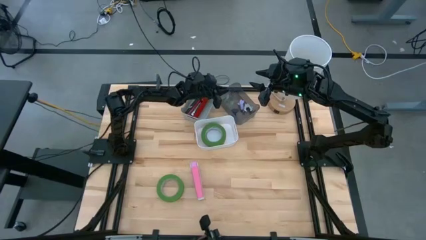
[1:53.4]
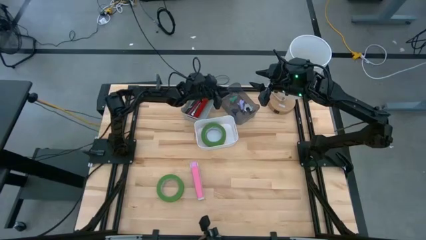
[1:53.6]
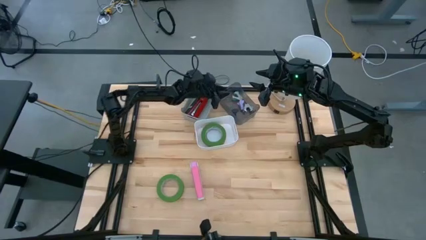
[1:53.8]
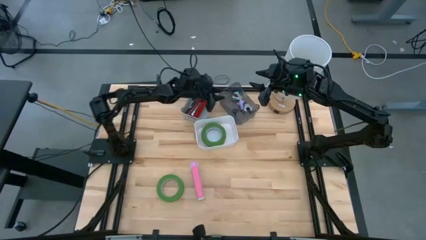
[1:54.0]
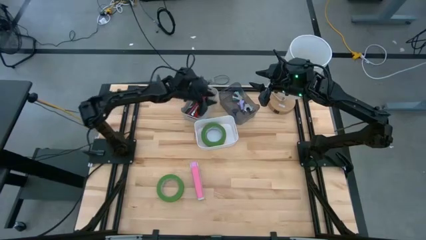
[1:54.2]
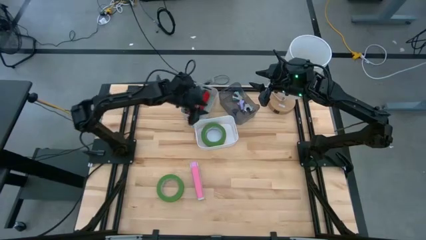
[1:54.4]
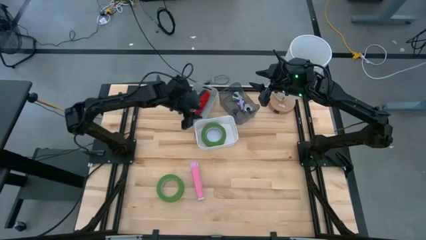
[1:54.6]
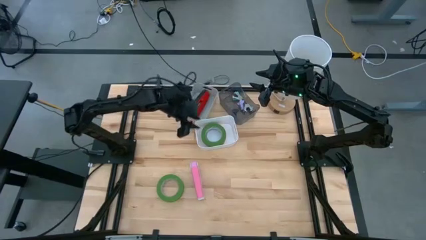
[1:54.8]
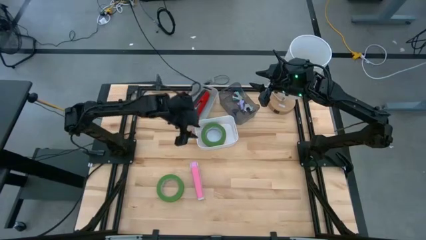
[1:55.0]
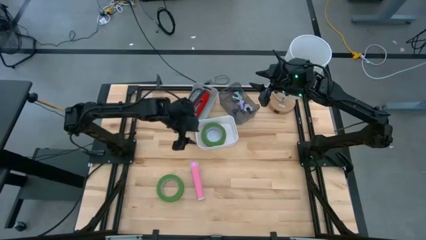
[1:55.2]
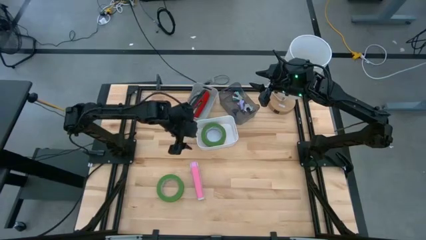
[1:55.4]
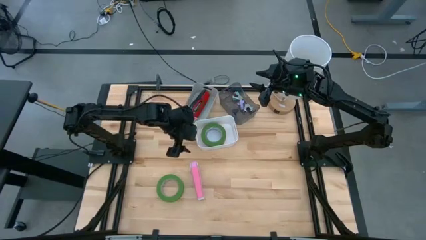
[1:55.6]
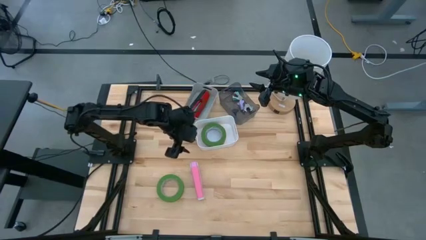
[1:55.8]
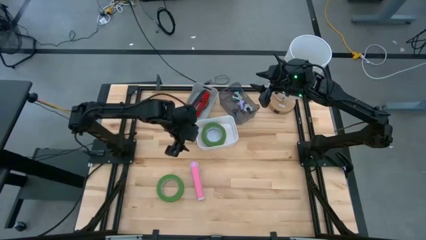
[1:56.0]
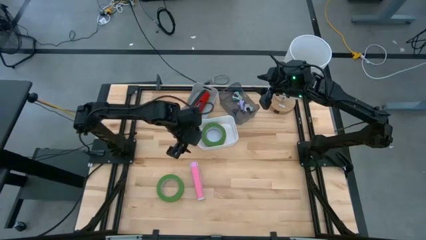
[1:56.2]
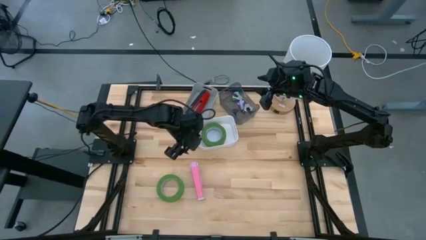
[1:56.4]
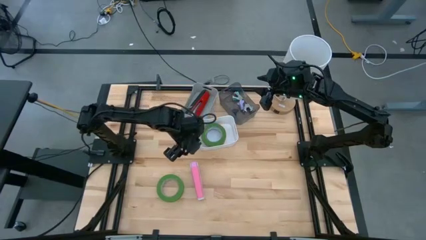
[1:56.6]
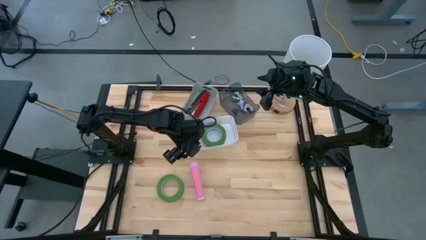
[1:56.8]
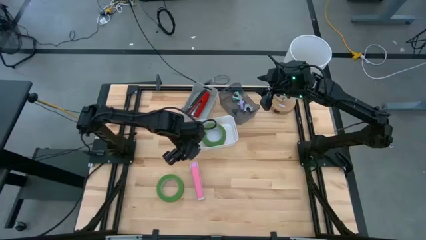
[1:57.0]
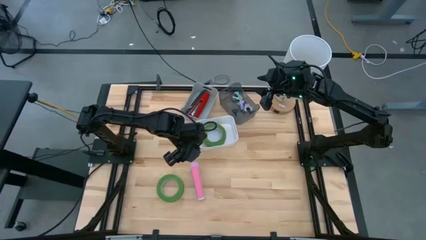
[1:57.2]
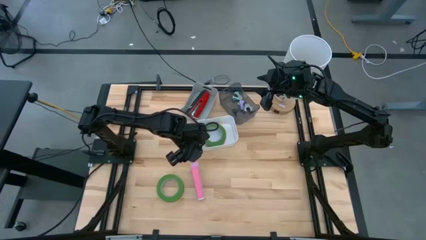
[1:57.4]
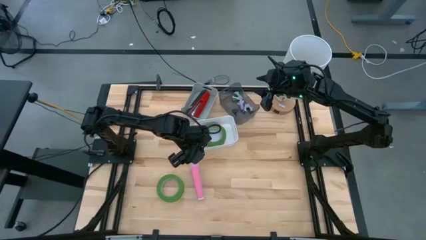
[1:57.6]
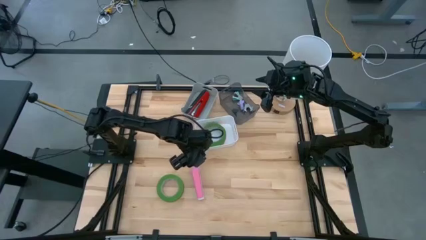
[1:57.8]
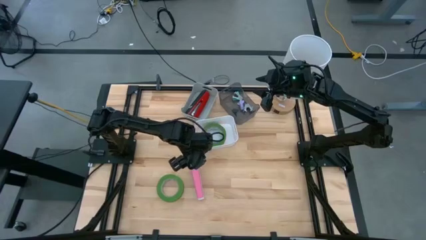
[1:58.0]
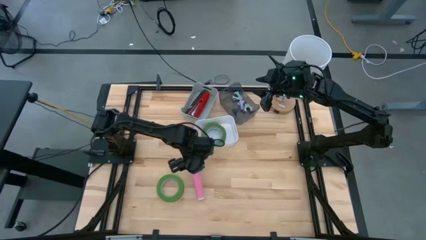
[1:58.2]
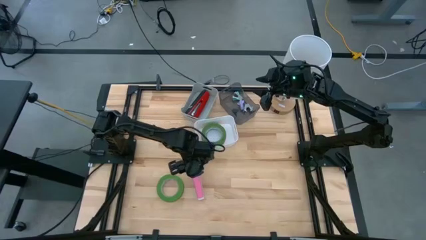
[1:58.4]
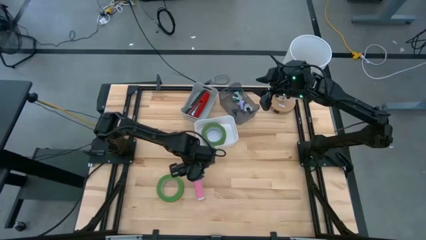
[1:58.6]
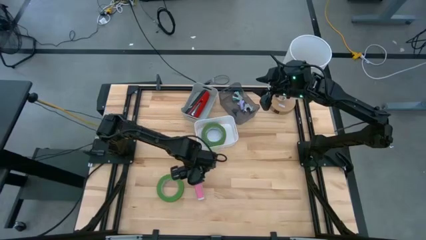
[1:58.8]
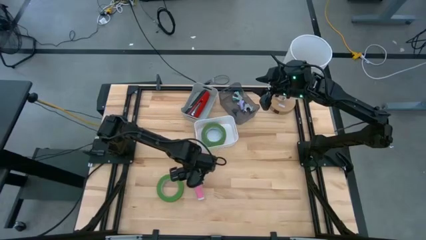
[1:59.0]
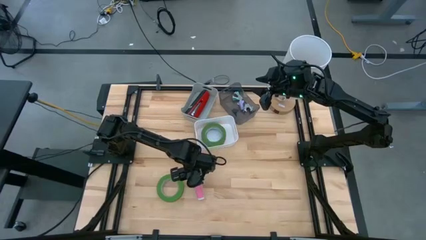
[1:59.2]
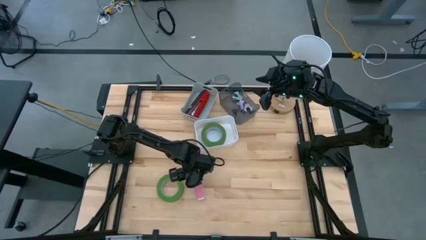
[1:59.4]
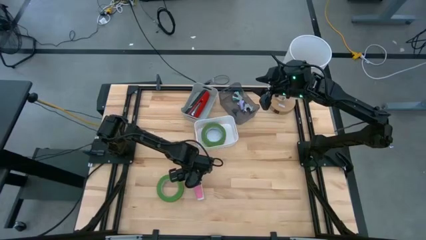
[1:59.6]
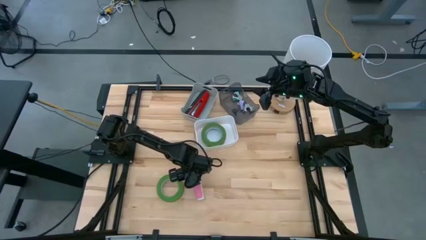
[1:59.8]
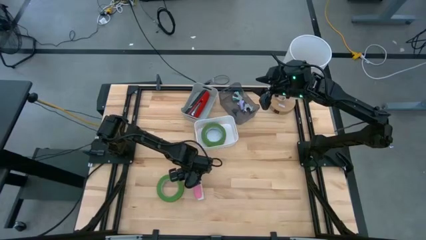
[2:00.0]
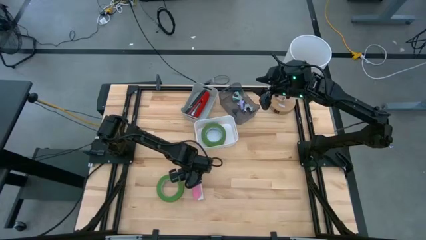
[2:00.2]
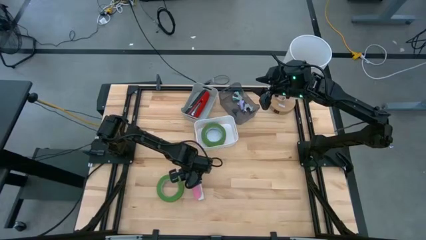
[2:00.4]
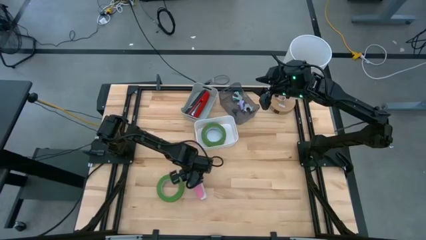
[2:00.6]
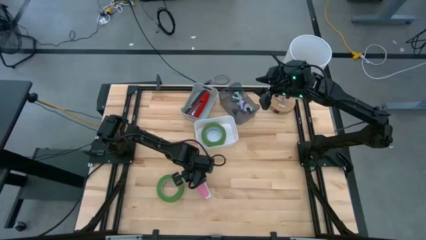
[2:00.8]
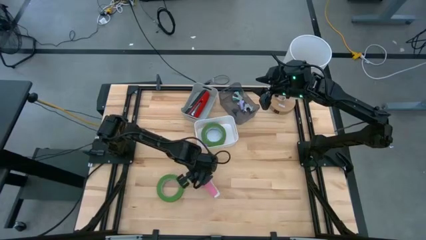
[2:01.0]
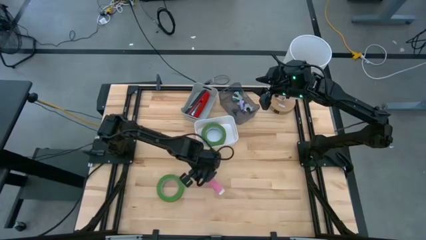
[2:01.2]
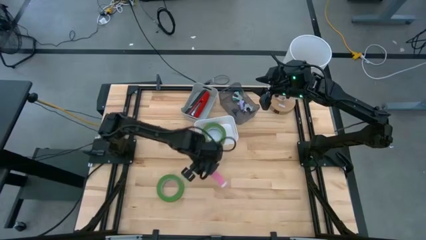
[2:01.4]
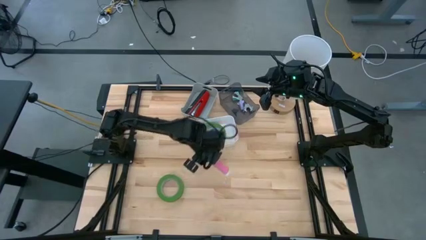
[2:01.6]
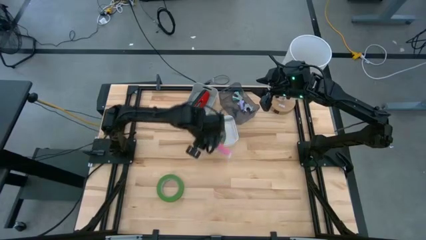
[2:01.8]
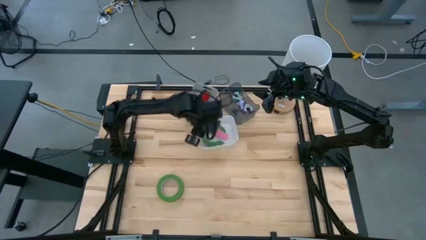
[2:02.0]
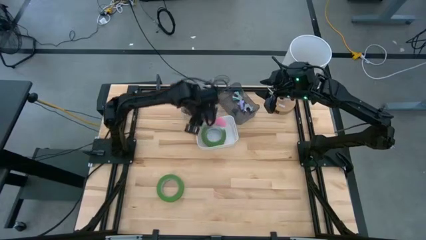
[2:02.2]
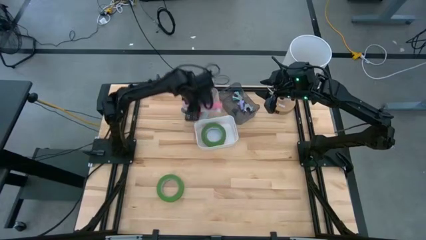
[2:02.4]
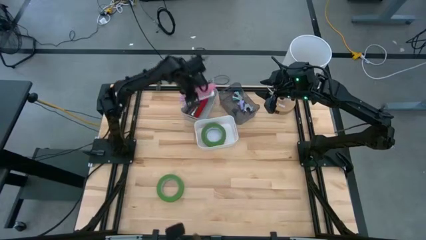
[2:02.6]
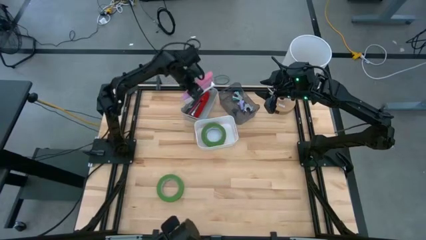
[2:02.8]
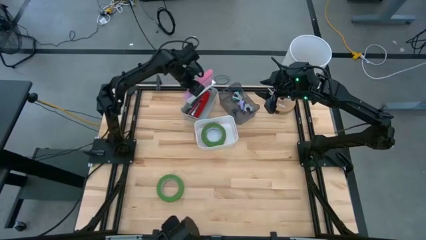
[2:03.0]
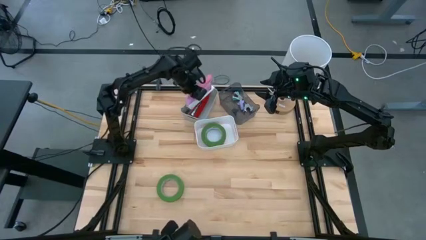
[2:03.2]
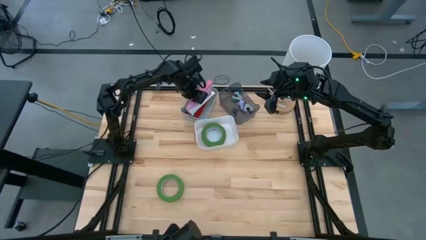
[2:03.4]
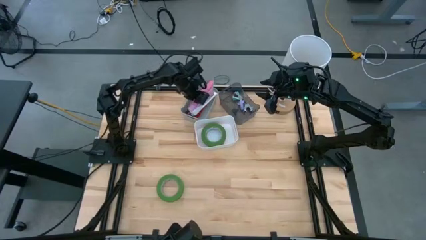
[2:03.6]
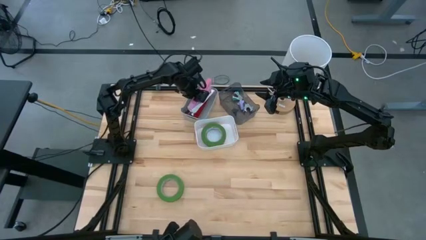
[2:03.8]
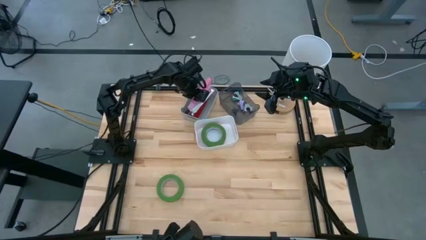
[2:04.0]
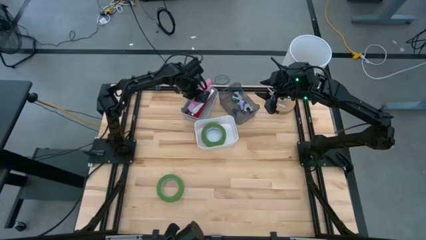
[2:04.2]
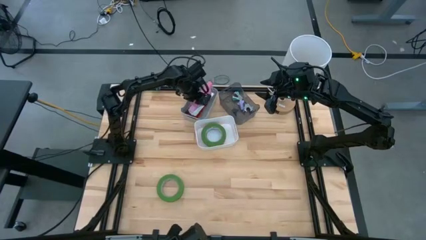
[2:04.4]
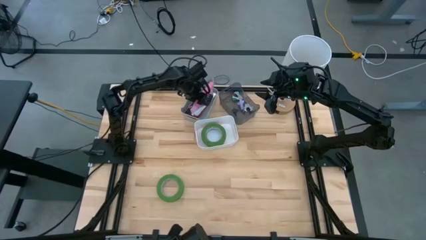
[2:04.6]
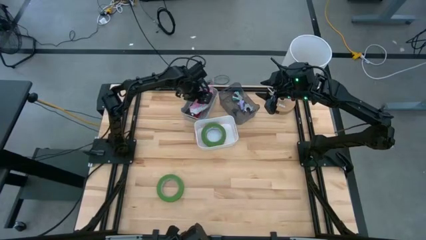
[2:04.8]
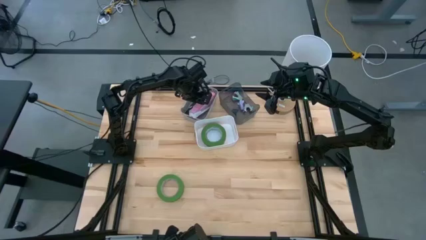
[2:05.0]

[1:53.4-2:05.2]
Task: Pick and place Stapler, Stapler remover, tape
Put the pink stapler into the gray bin

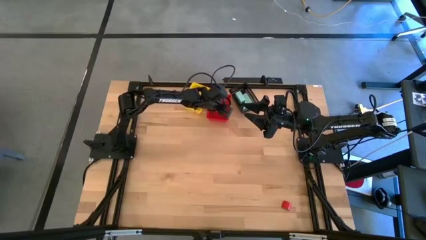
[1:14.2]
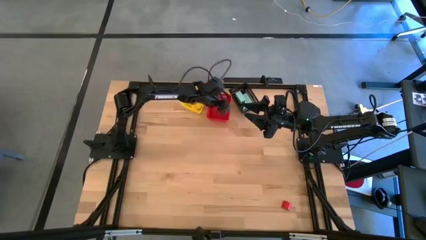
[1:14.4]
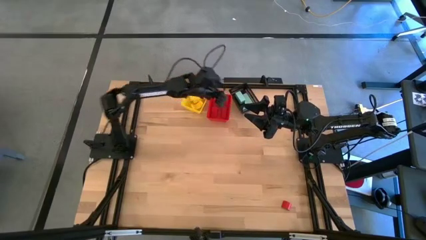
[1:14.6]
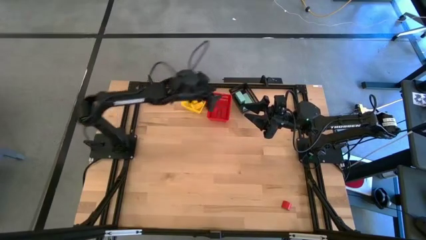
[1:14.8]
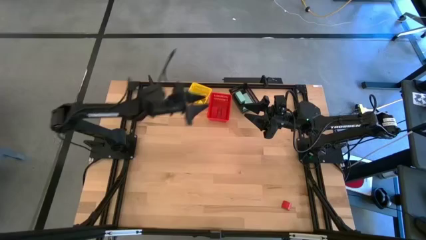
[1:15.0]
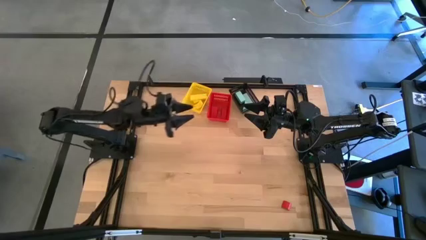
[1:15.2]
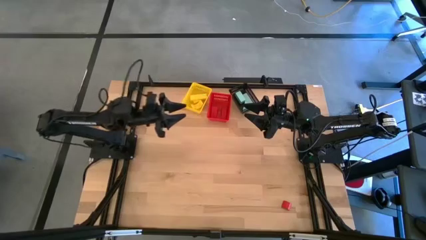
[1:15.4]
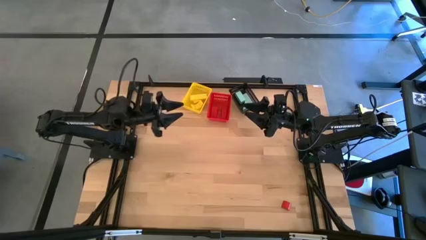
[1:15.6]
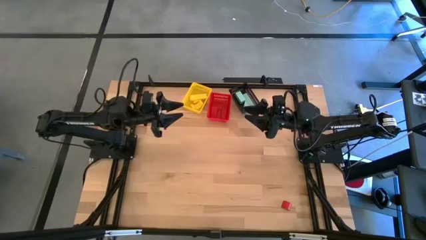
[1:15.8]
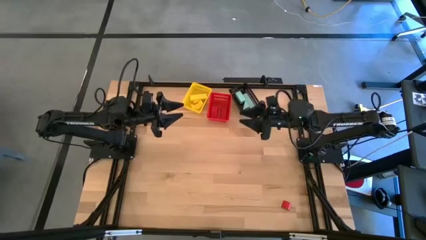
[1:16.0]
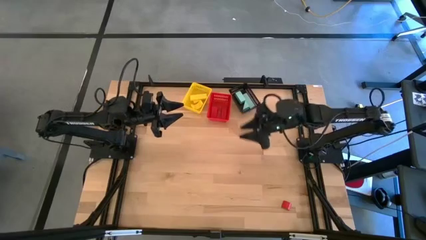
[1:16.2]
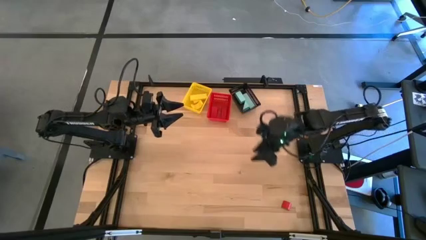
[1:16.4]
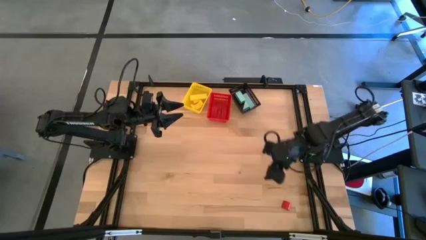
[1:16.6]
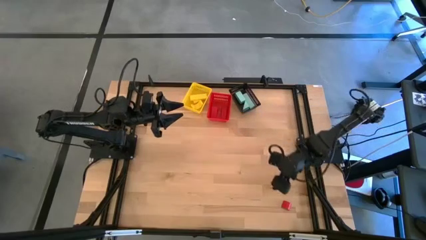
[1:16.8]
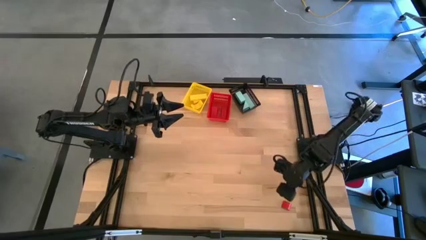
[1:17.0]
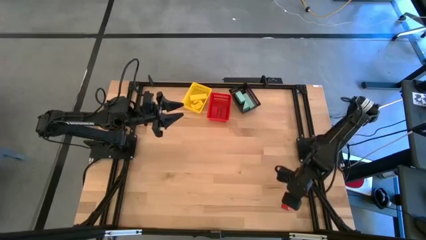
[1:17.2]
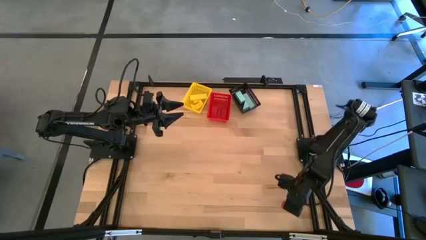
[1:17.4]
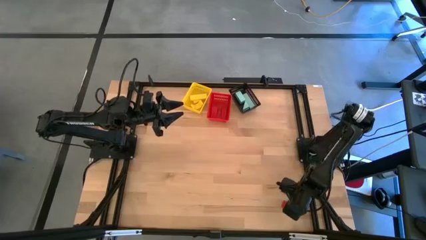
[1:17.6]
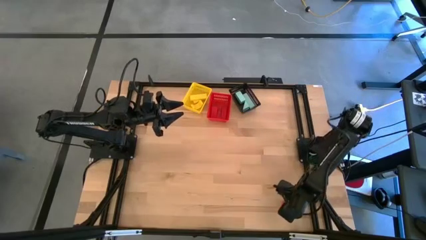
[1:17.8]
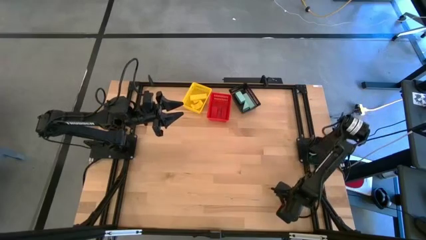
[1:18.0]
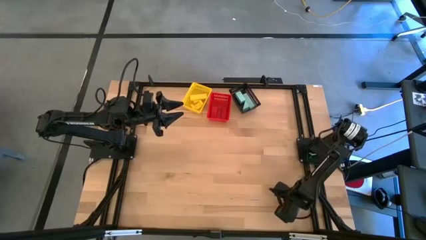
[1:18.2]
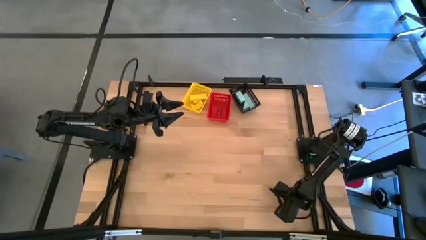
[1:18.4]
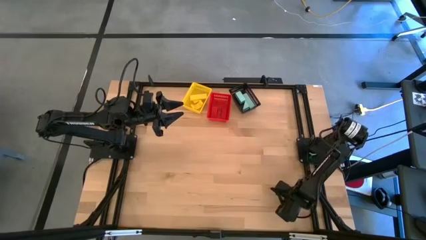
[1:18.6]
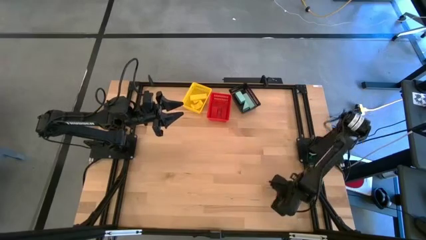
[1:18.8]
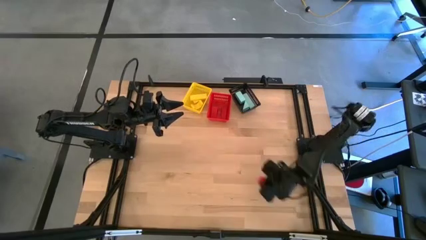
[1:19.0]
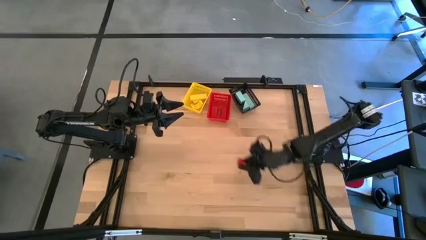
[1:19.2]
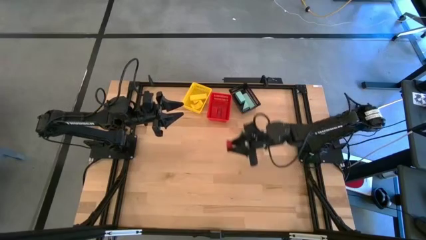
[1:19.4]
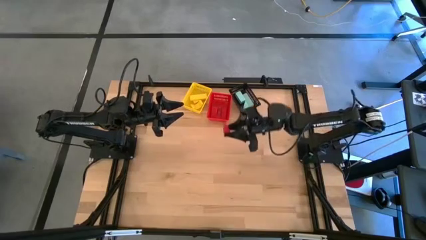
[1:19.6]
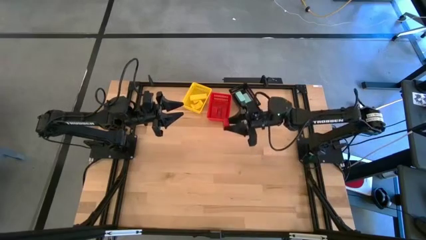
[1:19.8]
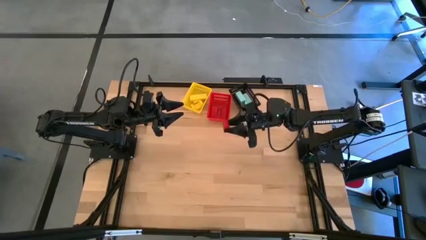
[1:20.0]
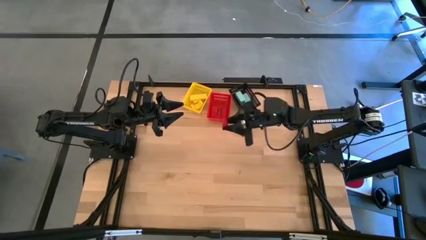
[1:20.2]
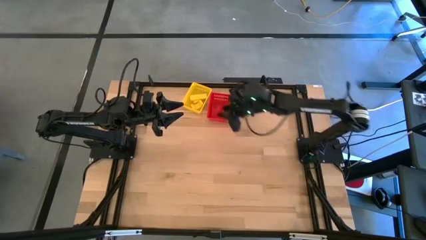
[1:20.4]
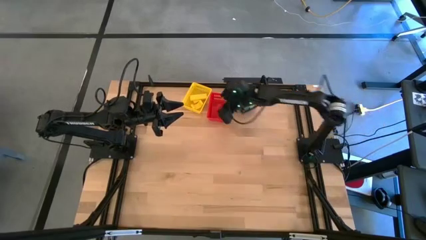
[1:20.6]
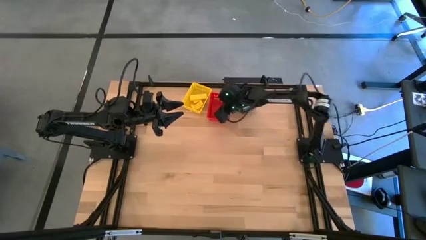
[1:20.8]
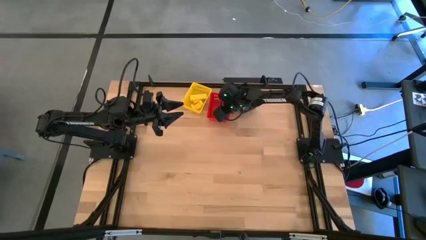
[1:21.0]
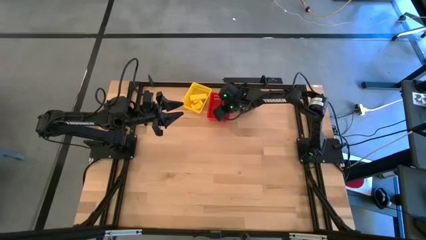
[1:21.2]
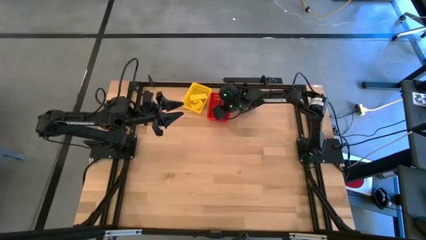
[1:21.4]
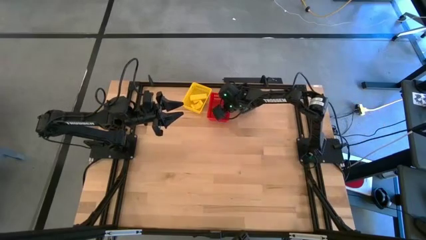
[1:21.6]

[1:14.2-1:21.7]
Task: Sort & place blocks by color
Put the red block into the red bin
